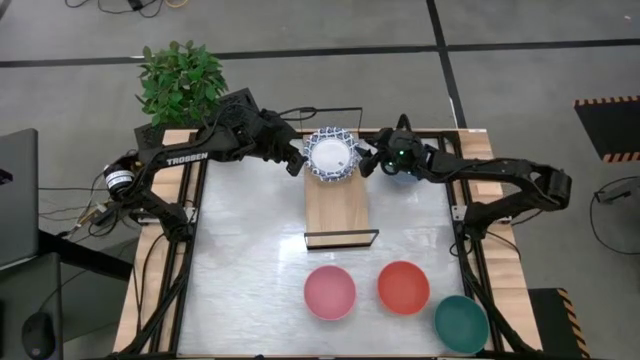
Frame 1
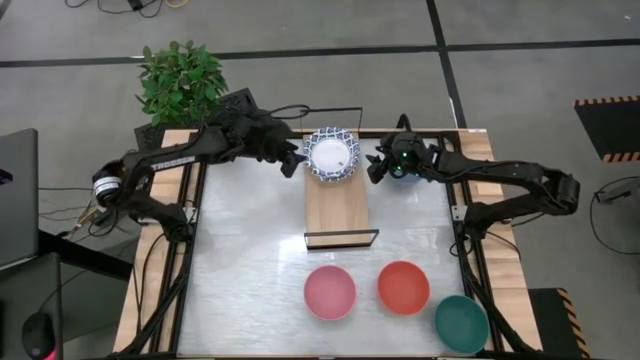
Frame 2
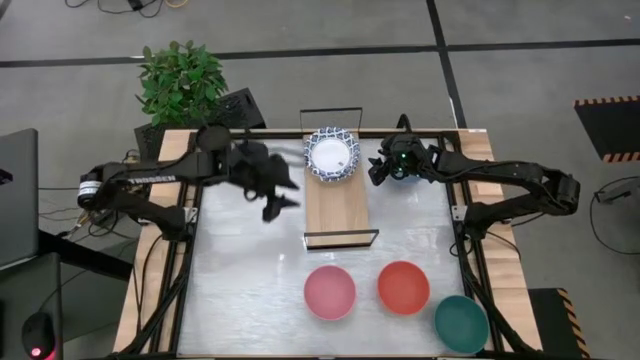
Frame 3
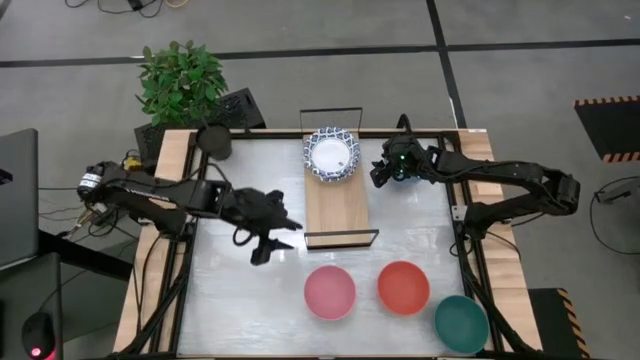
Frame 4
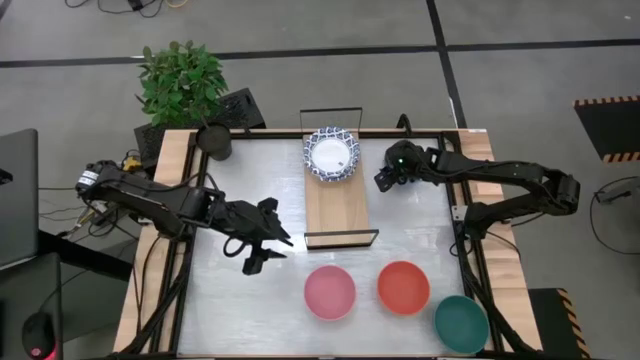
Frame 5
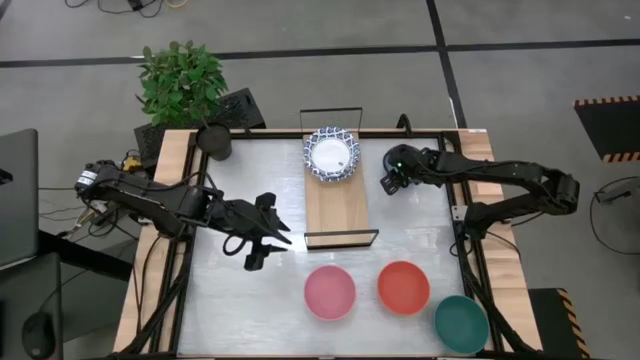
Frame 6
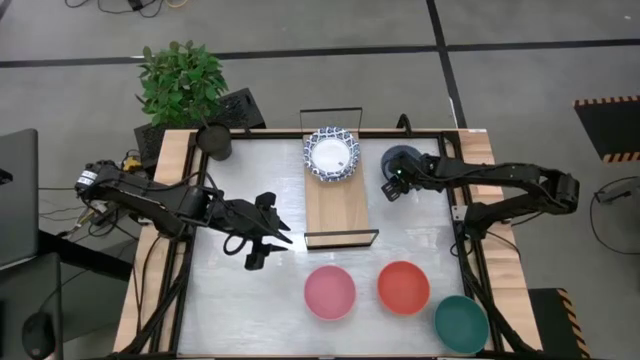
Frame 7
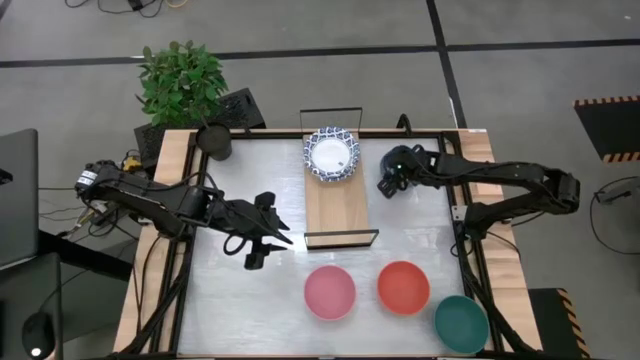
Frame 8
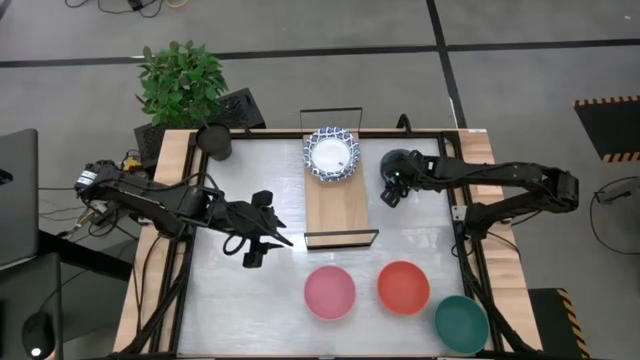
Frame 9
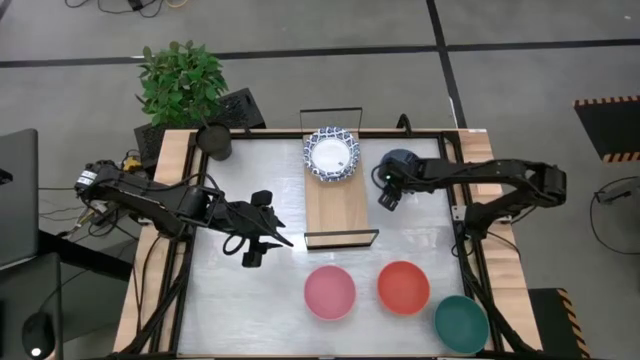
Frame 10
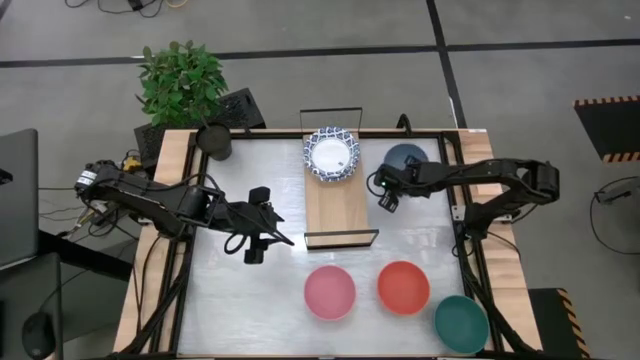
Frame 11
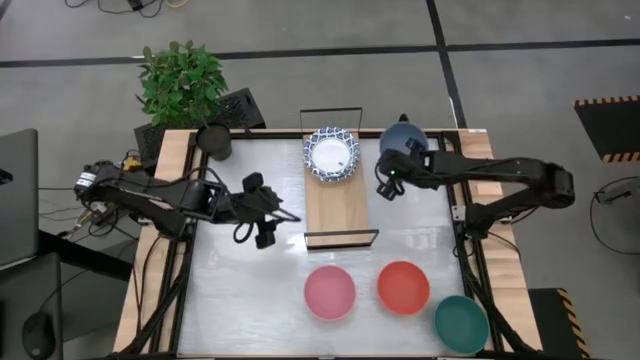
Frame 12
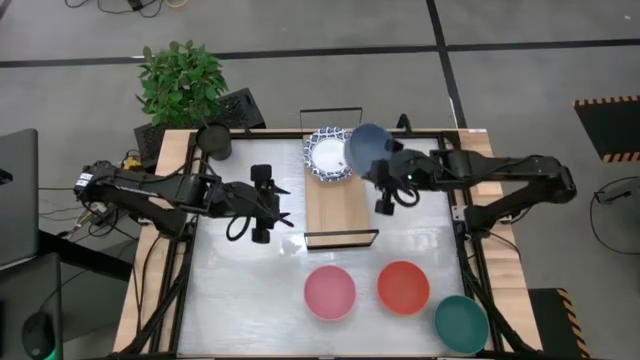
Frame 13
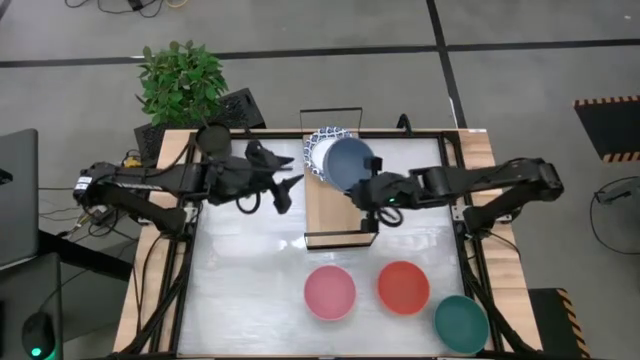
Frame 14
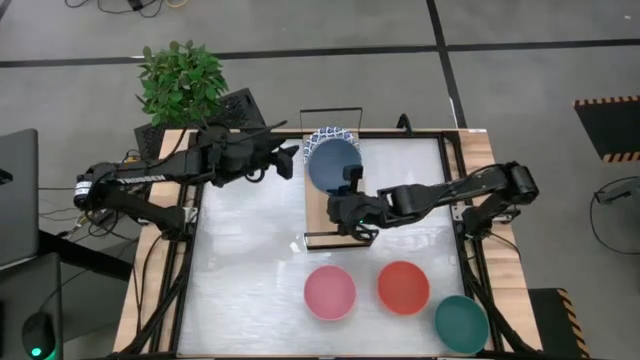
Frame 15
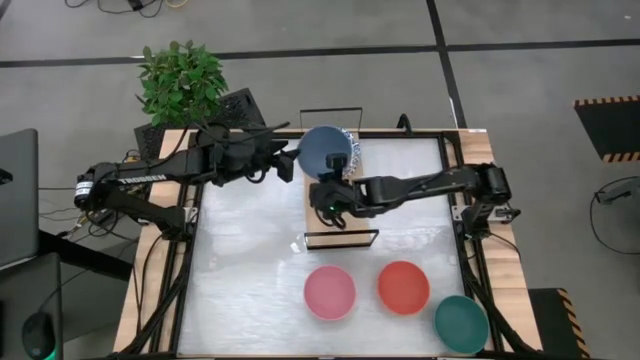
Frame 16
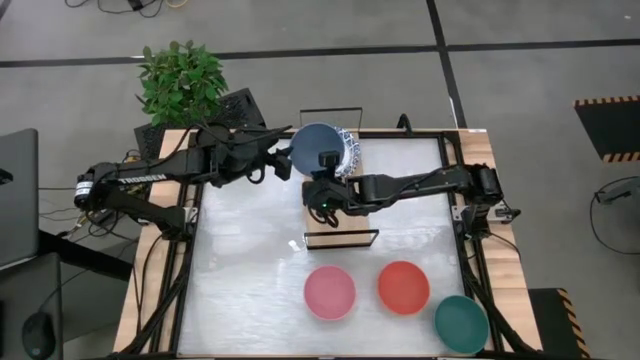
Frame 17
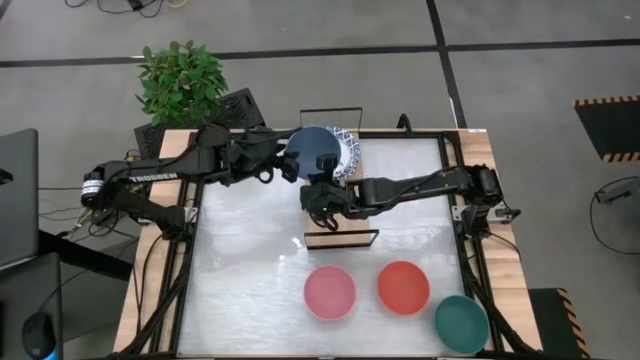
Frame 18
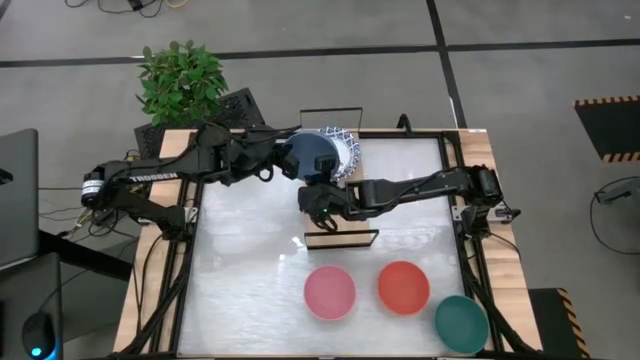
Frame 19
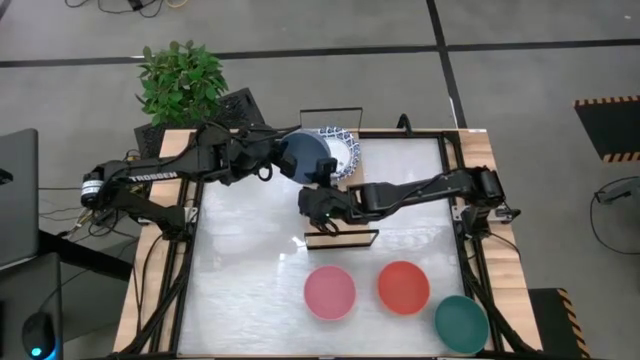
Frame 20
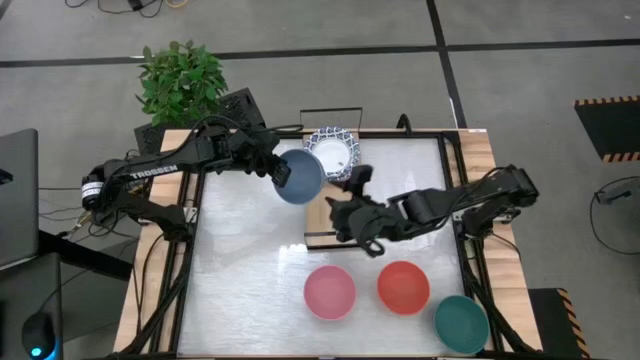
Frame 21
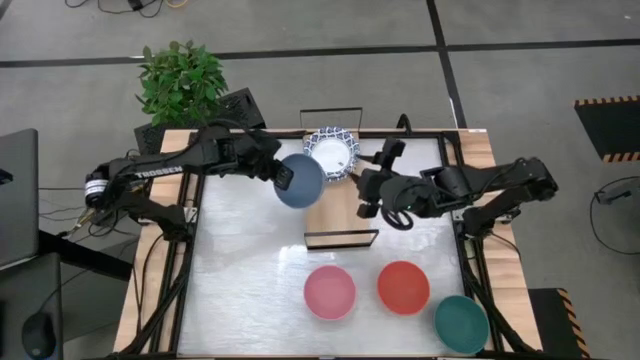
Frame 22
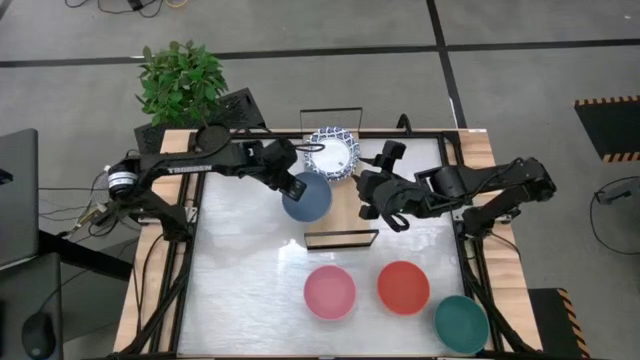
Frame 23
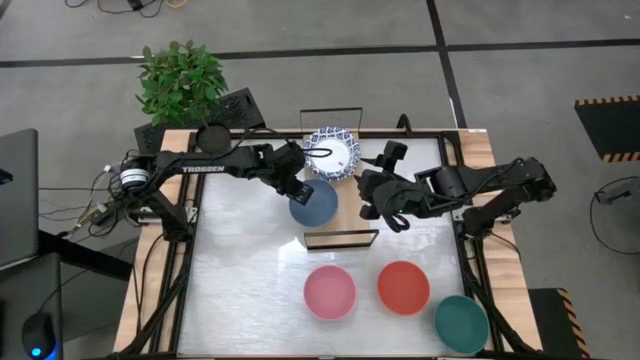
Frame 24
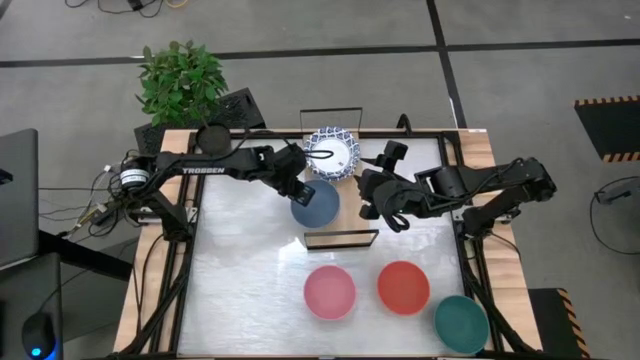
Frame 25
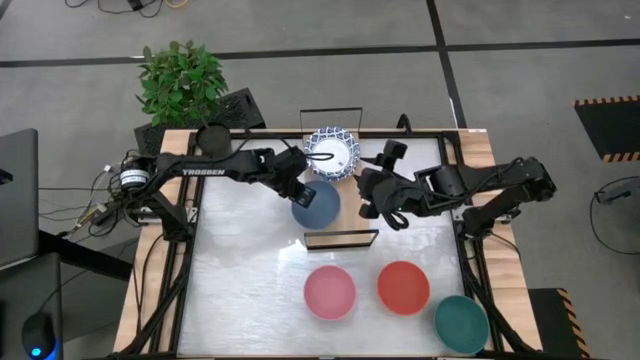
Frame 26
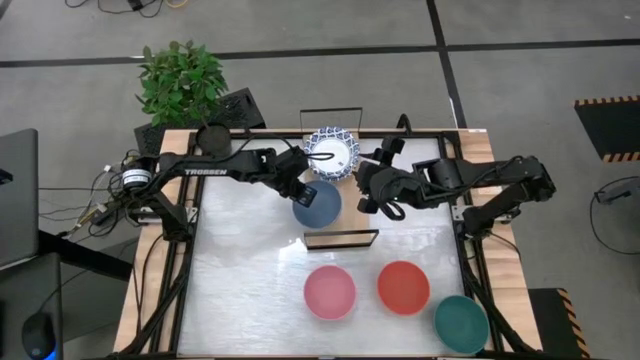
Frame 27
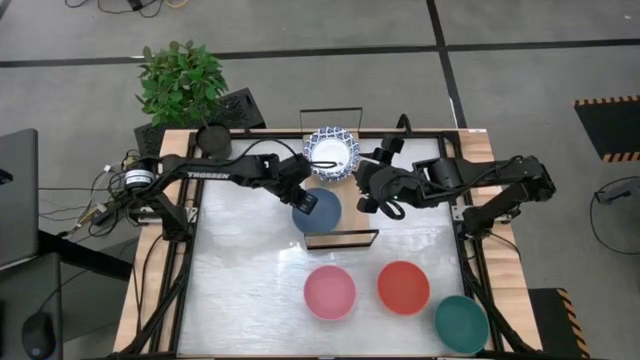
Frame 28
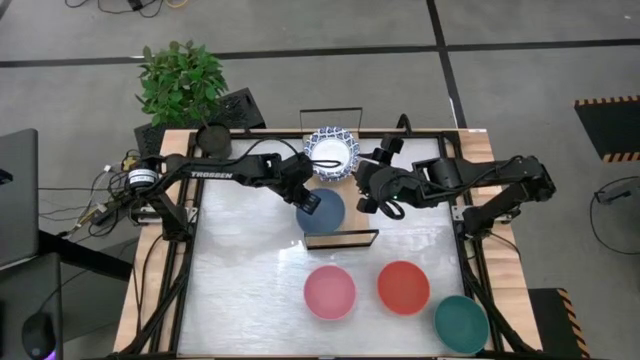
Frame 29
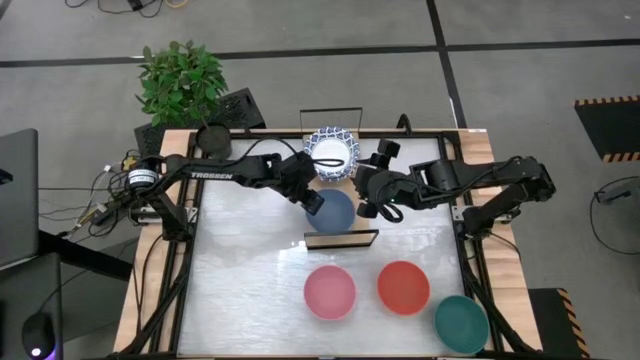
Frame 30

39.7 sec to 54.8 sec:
Task: Place and stack bowls onto a shelf
Put the blue bowl on the shelf

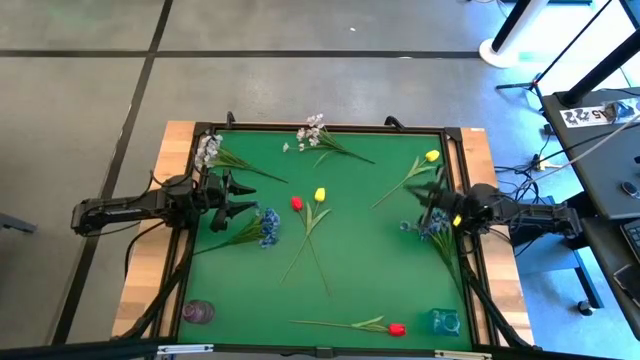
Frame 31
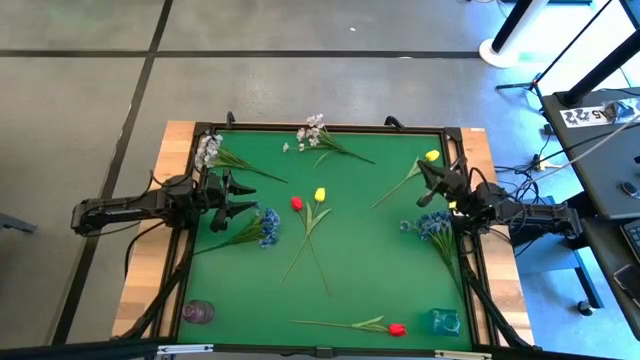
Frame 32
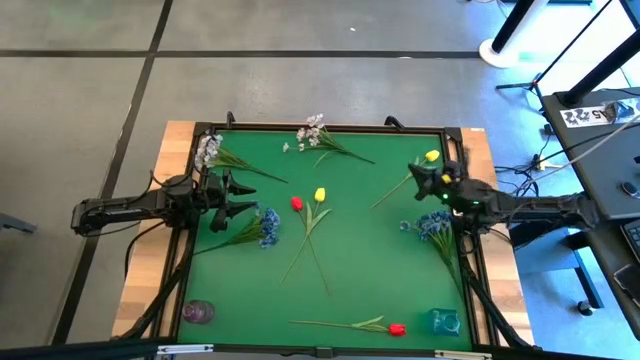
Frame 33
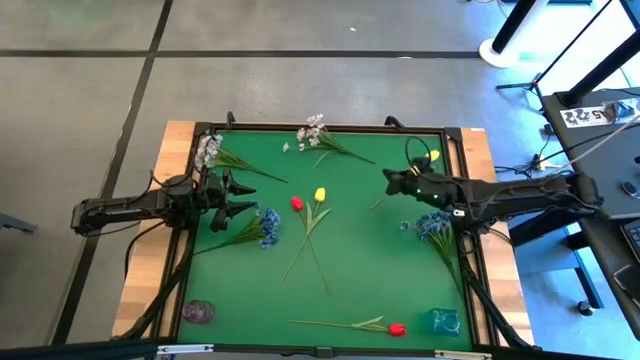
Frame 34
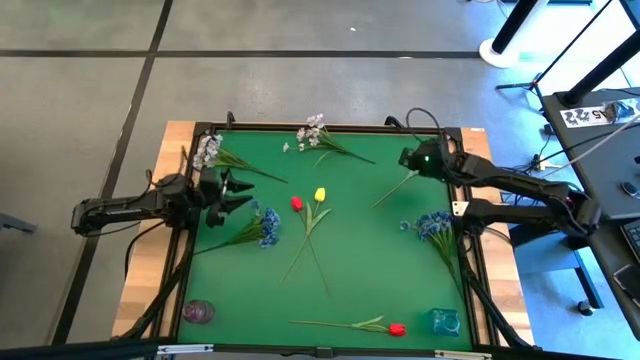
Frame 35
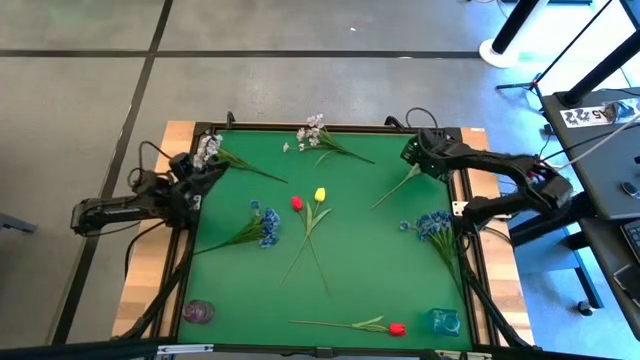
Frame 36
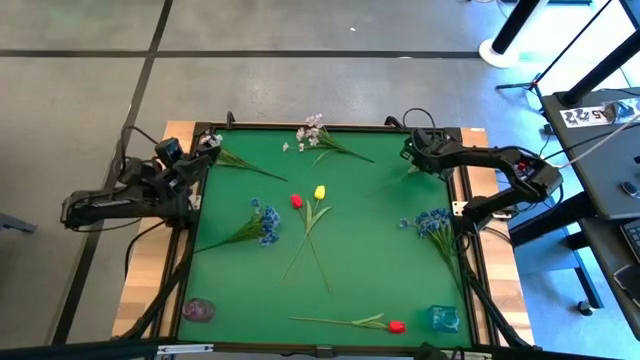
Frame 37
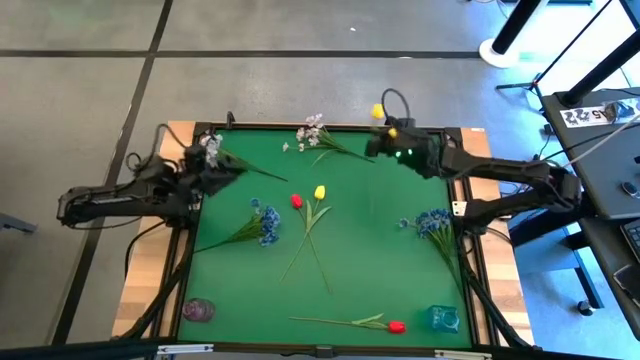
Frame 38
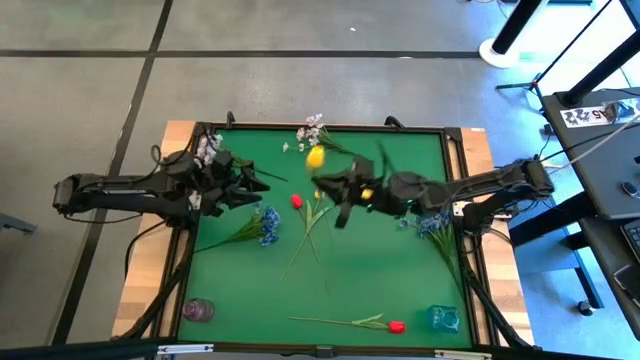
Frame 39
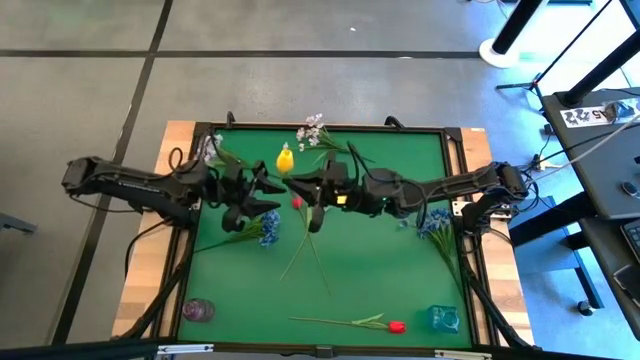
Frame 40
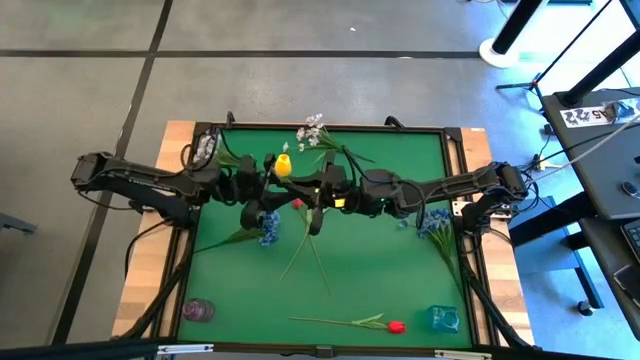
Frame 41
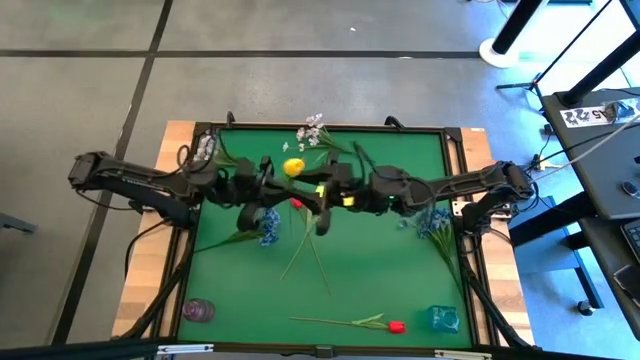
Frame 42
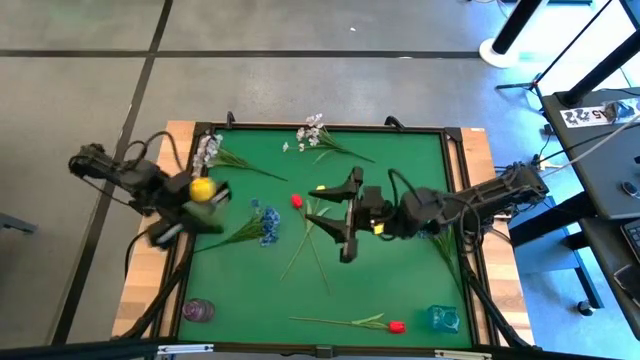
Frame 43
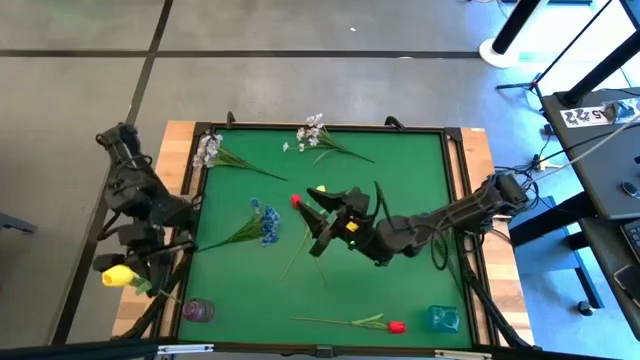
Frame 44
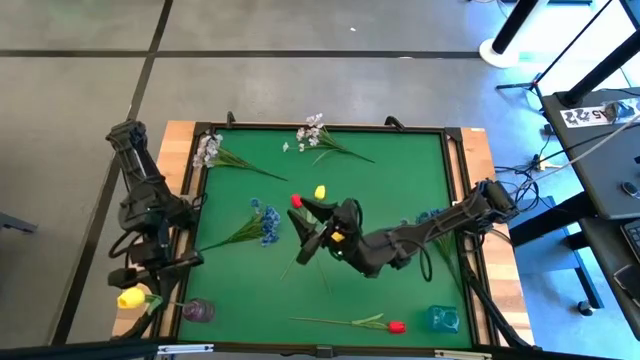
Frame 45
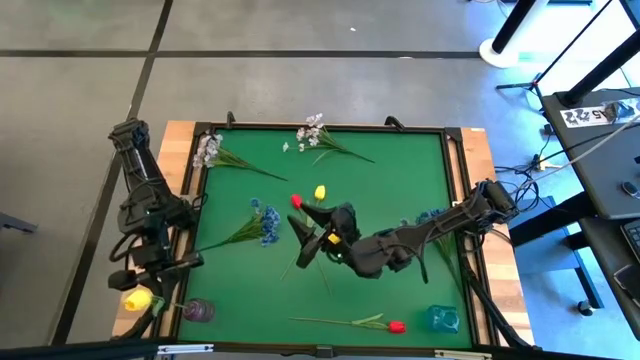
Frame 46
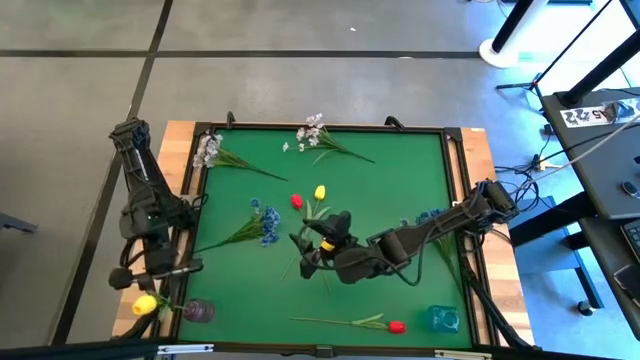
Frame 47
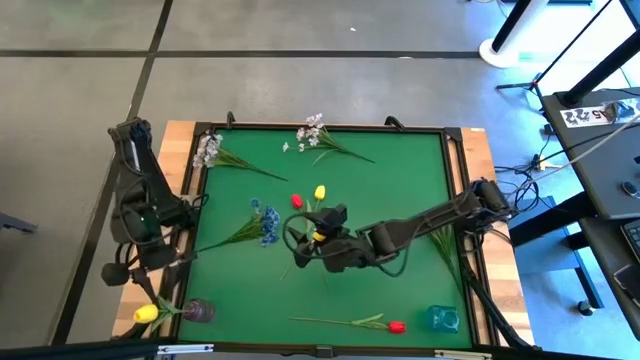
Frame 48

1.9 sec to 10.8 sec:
Task: Sort flowers into vase by color
Put the top yellow tulip into the purple vase
